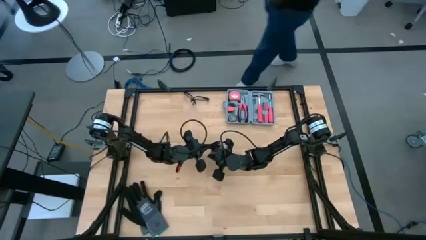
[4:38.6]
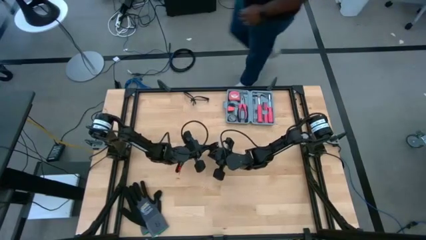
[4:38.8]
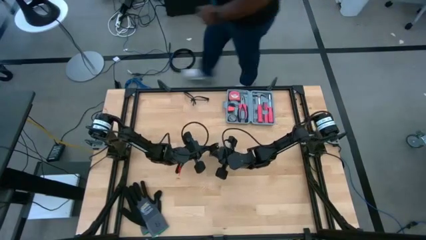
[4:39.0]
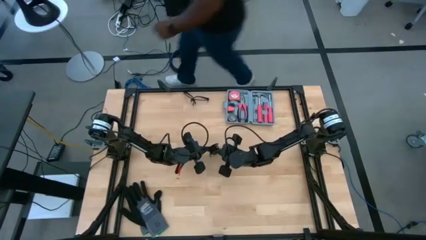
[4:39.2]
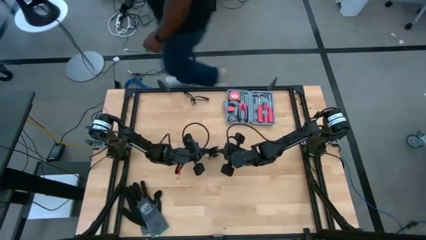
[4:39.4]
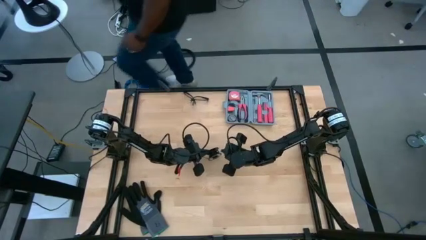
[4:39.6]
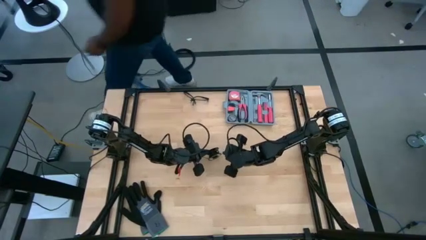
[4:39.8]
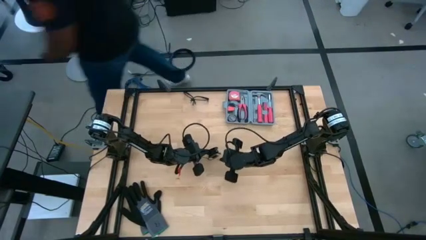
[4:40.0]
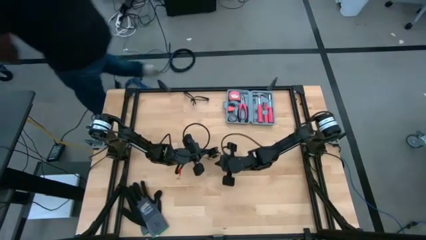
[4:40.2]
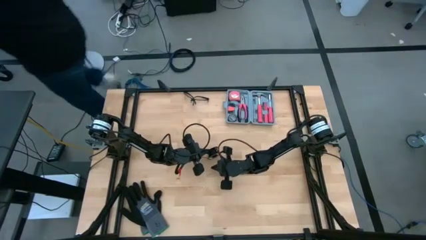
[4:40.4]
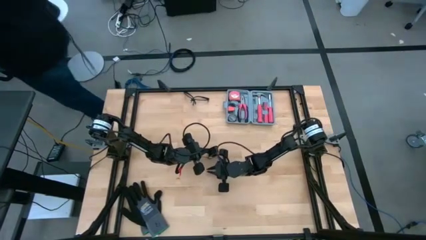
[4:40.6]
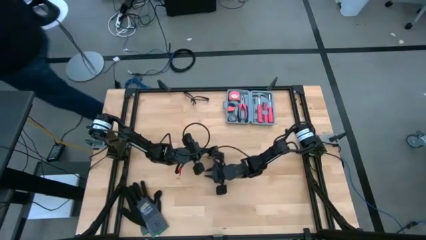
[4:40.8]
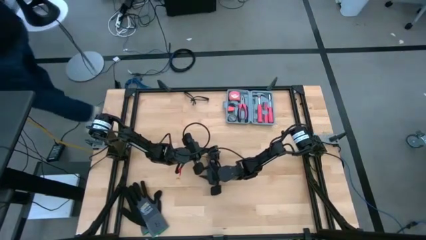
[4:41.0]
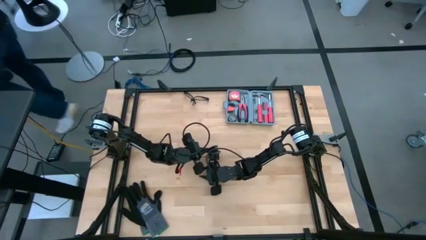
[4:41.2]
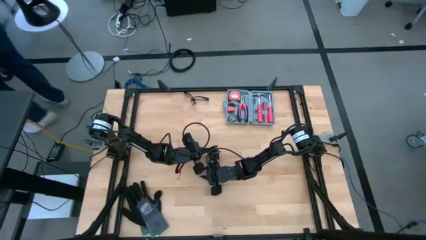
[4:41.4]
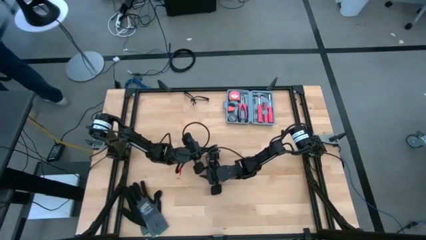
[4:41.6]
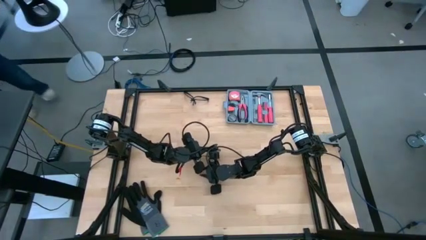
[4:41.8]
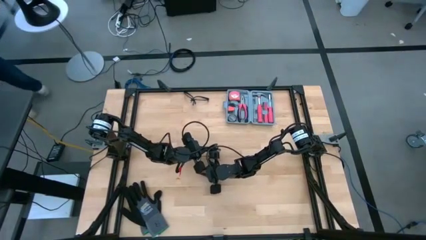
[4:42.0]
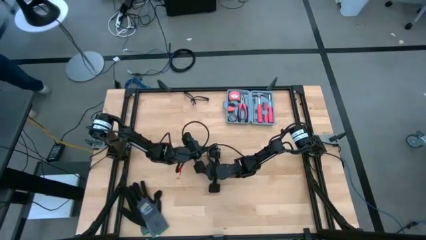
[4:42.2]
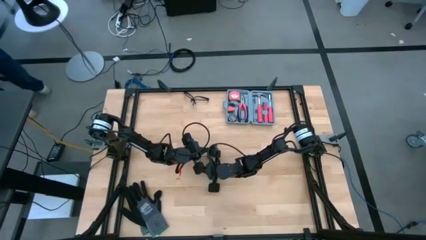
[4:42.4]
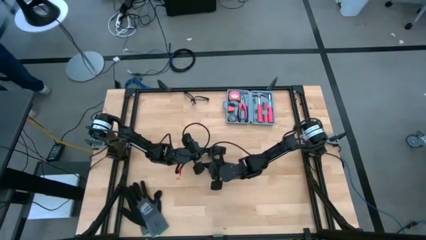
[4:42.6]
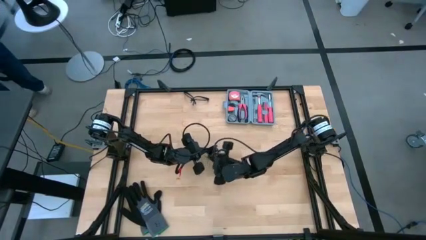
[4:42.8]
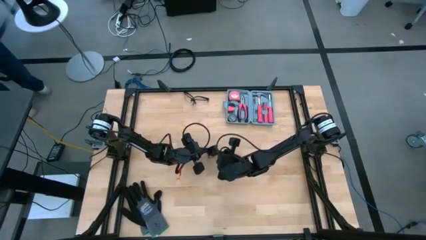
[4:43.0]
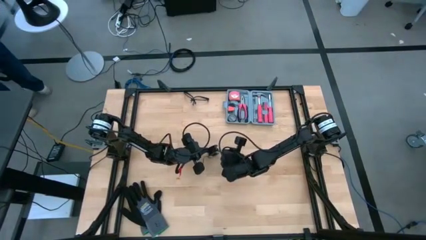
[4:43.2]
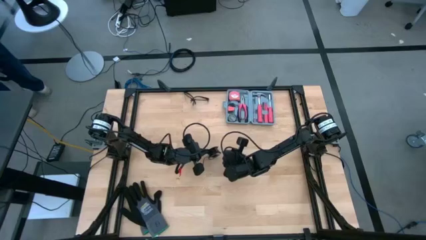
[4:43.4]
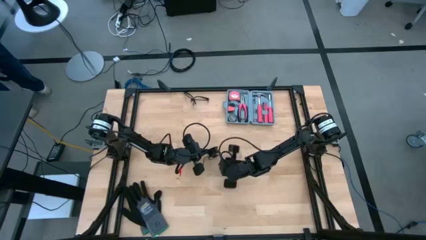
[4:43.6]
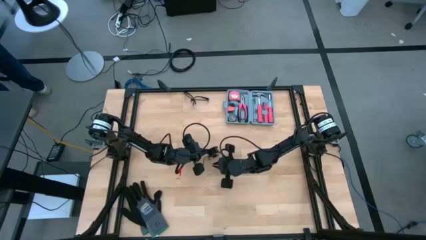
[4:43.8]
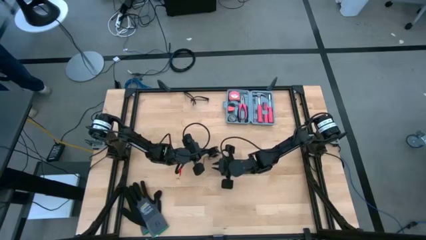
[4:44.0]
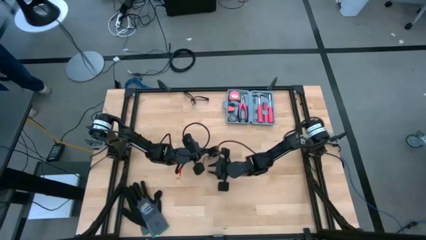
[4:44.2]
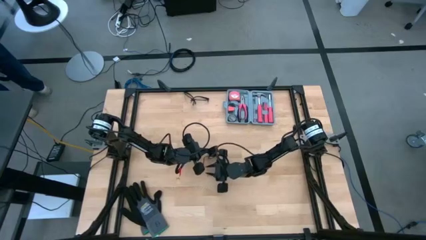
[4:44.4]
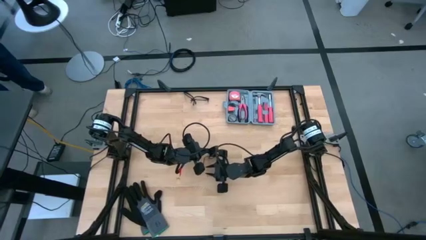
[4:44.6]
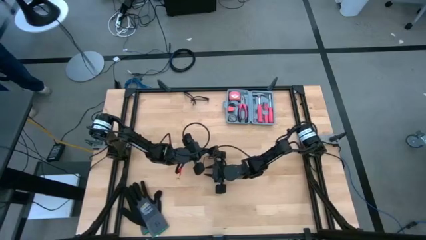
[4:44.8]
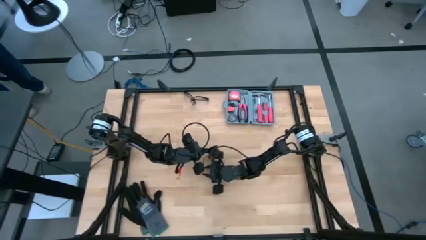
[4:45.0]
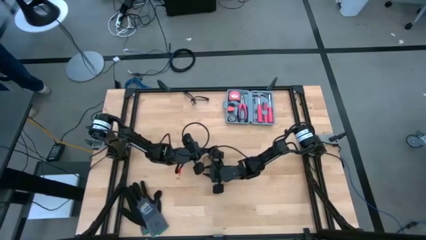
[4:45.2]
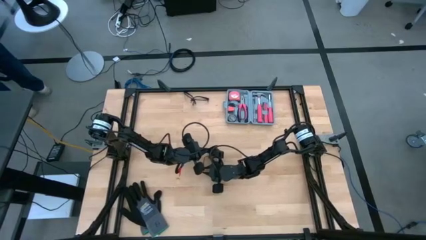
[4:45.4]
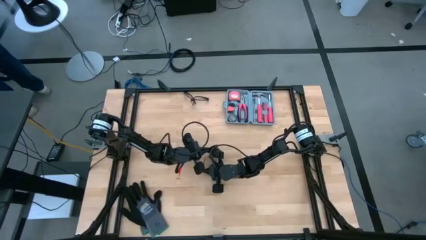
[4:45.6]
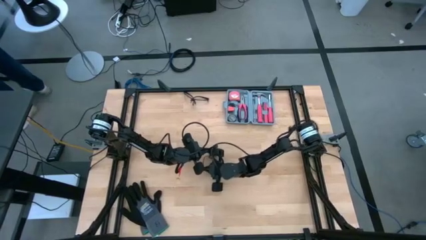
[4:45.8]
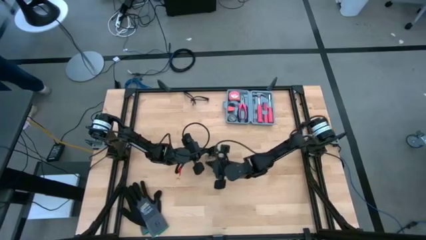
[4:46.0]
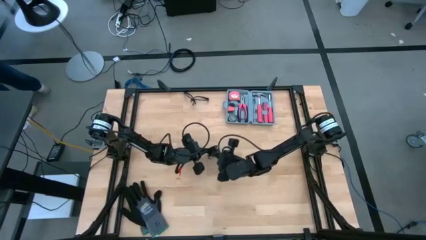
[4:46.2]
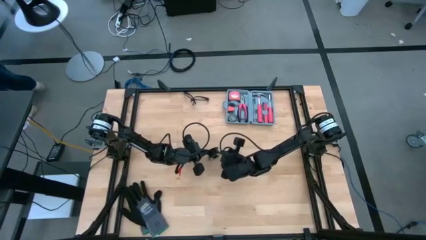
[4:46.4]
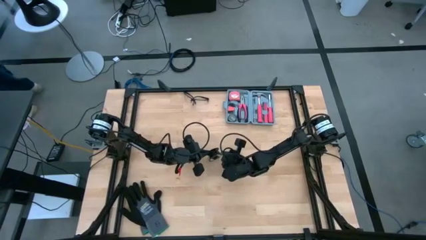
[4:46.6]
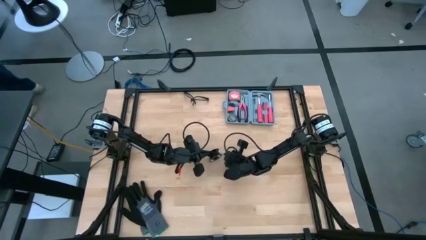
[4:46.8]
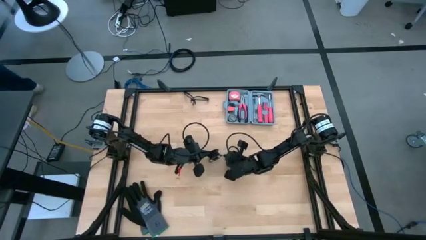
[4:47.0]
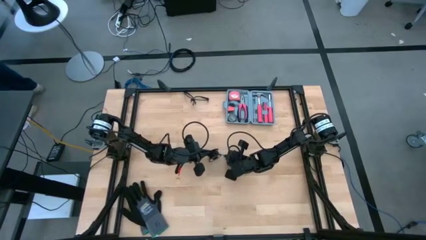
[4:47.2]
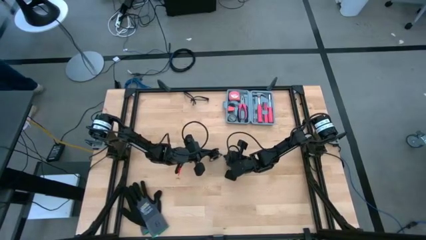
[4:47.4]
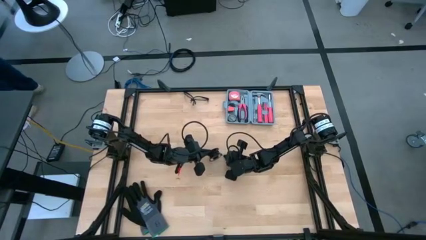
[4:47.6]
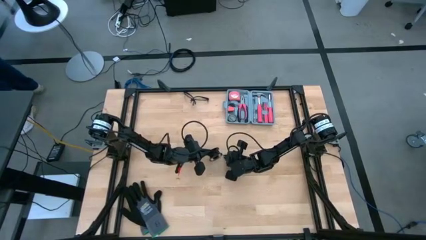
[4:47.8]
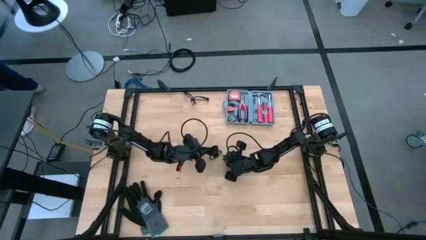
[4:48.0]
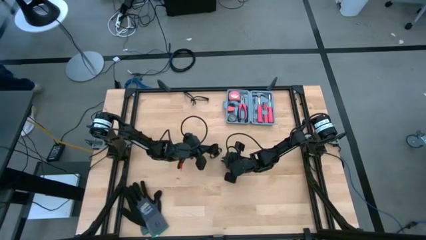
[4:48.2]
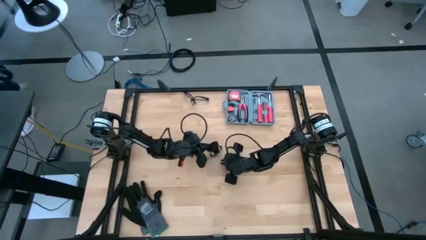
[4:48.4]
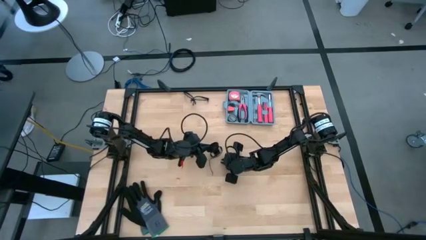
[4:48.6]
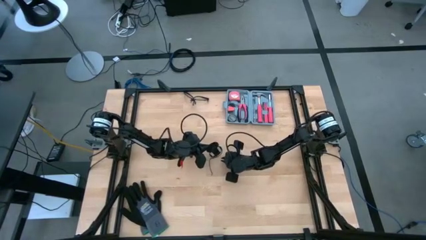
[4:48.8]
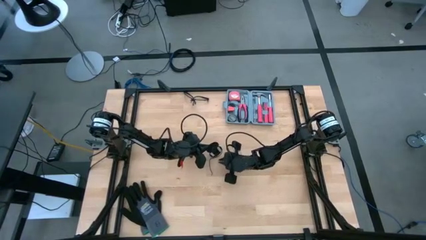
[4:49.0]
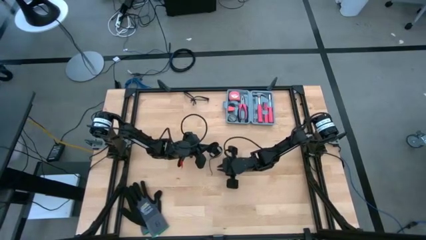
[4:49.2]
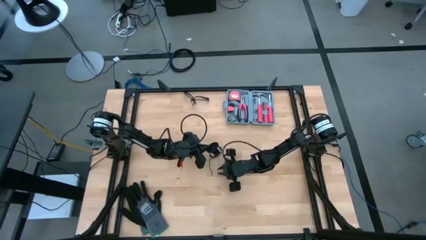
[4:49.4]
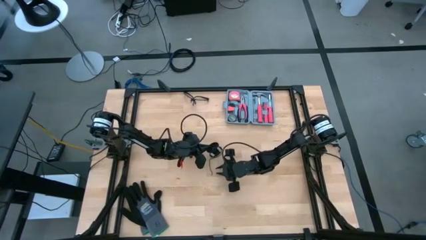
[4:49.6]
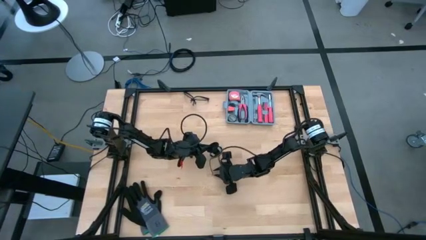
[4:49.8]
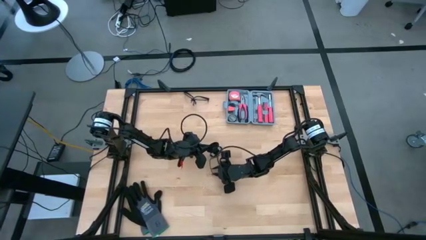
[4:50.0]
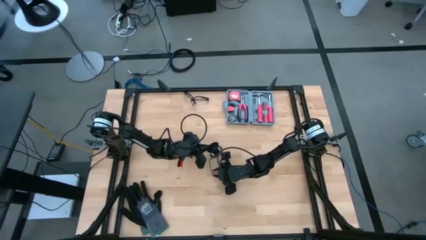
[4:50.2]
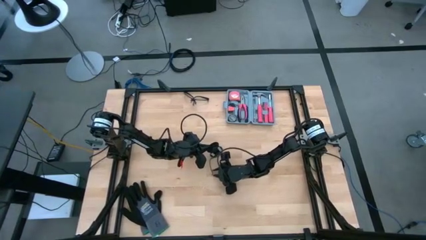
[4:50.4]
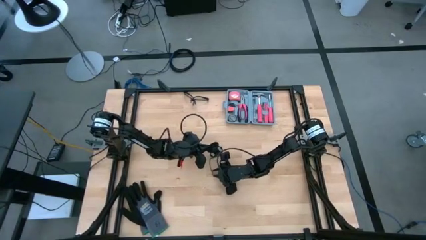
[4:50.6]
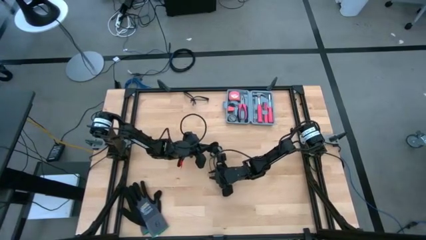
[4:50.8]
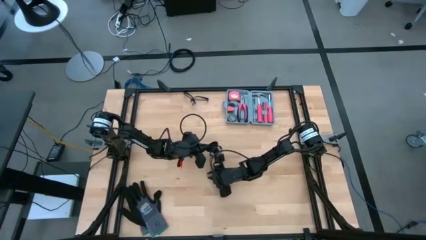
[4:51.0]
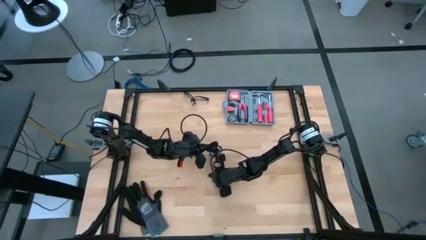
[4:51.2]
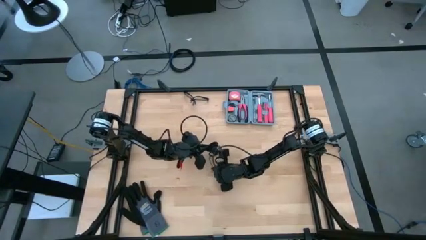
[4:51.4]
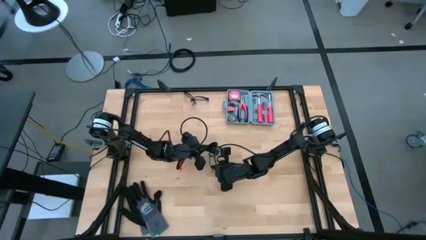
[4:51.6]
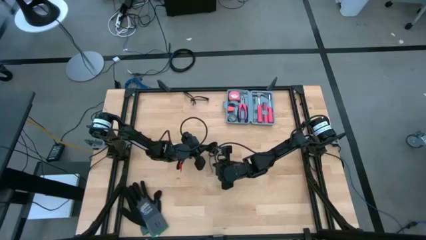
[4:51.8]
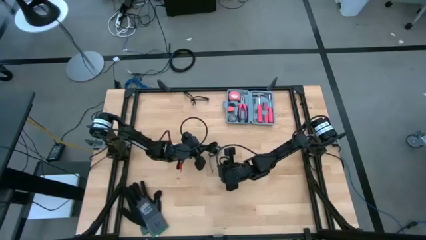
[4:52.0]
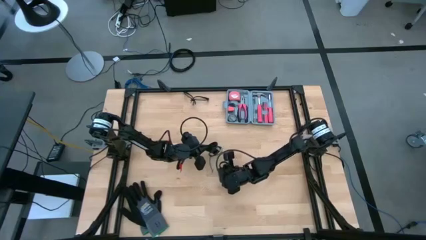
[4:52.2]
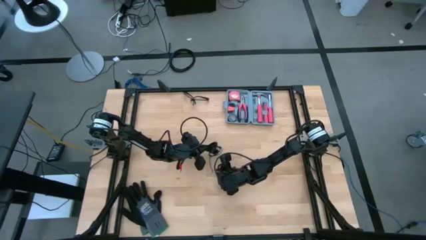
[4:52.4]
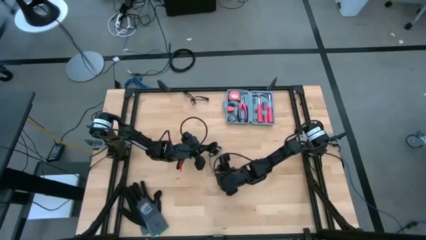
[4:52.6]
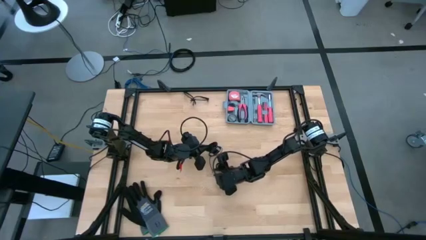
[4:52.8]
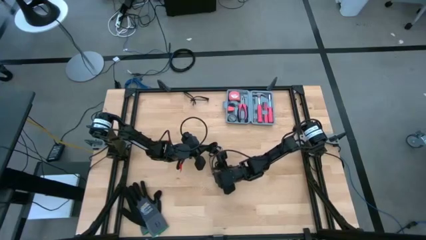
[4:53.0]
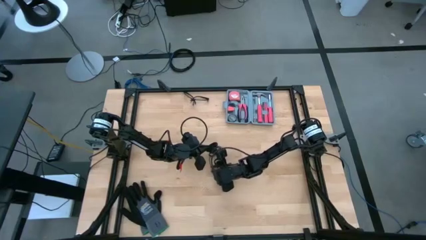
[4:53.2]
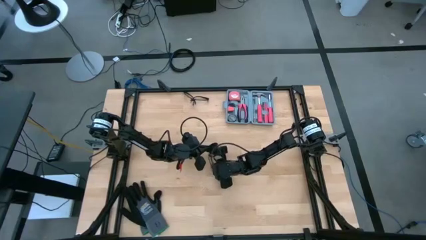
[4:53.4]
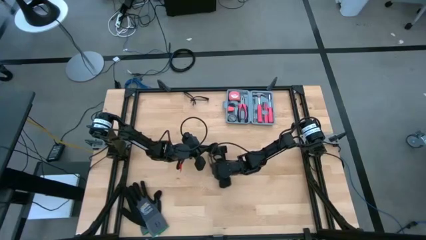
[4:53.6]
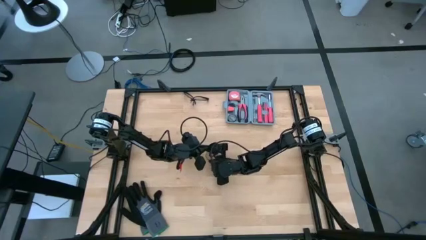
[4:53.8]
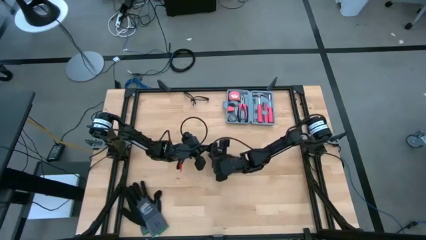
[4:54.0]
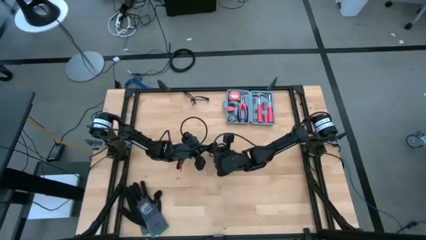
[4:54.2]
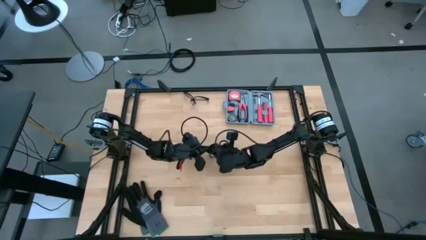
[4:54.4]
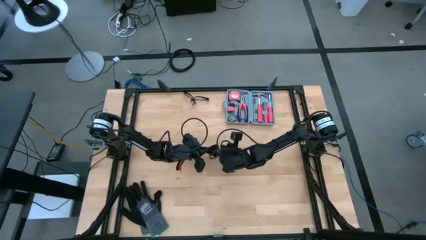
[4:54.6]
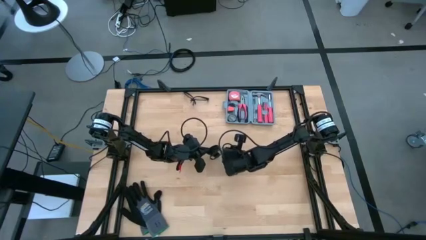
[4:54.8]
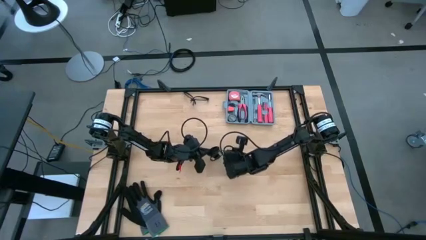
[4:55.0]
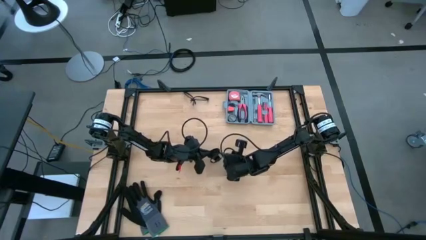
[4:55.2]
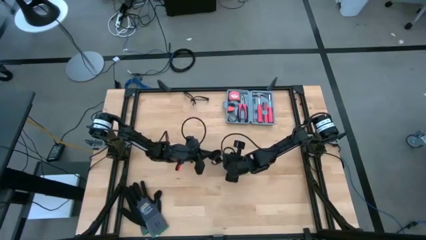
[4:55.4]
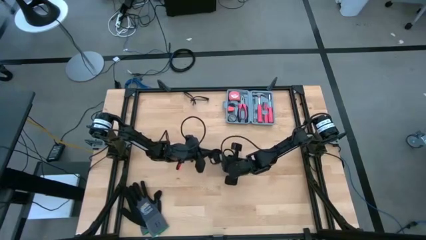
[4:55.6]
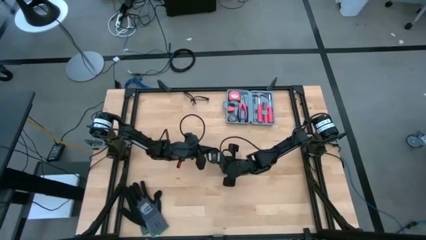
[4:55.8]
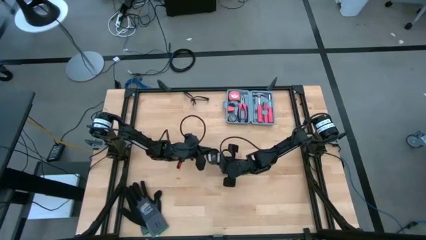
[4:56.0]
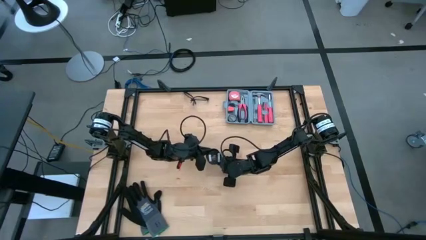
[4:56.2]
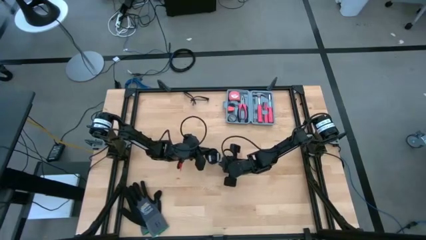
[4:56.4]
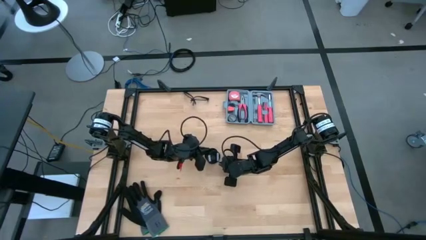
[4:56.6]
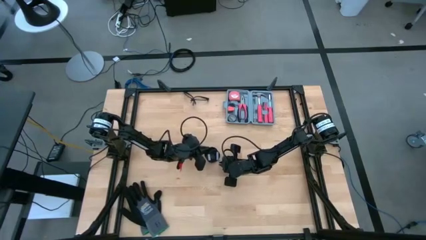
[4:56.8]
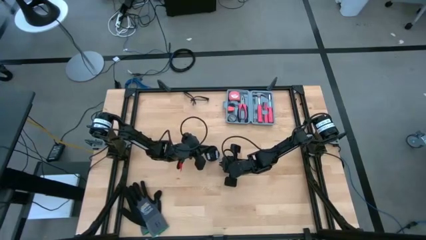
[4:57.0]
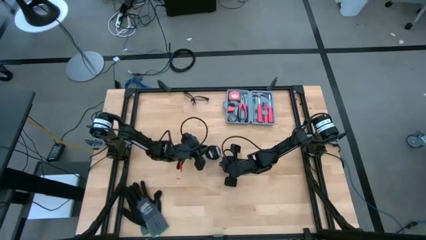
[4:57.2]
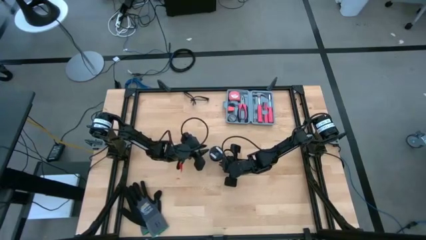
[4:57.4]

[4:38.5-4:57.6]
Task: Coil cords
Coil the black wire onto the spool
